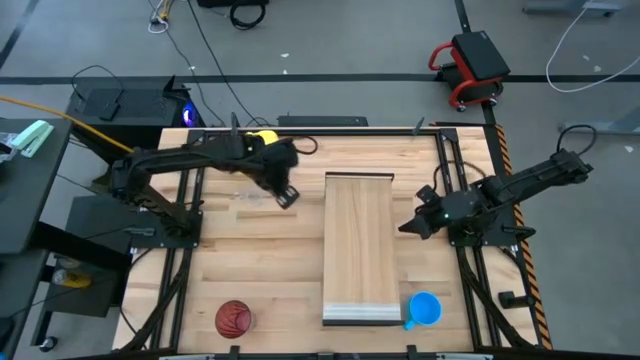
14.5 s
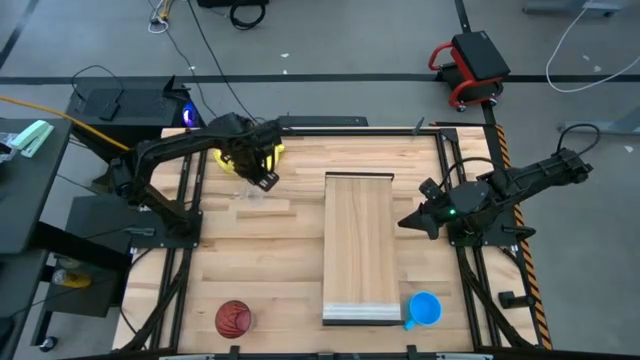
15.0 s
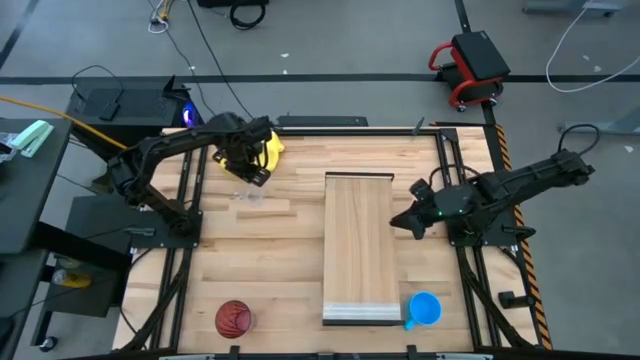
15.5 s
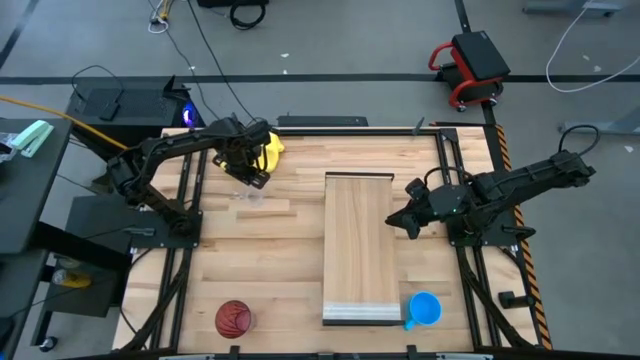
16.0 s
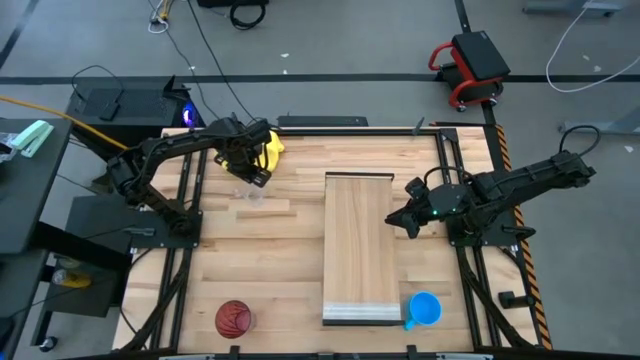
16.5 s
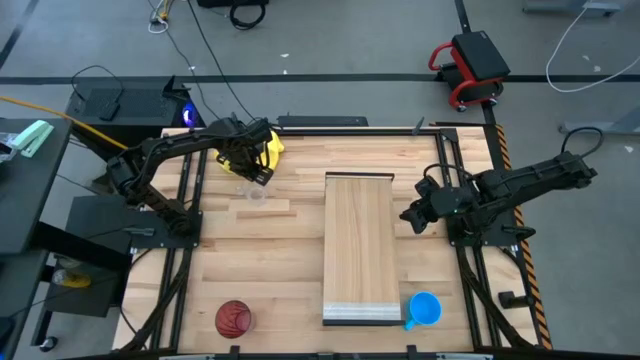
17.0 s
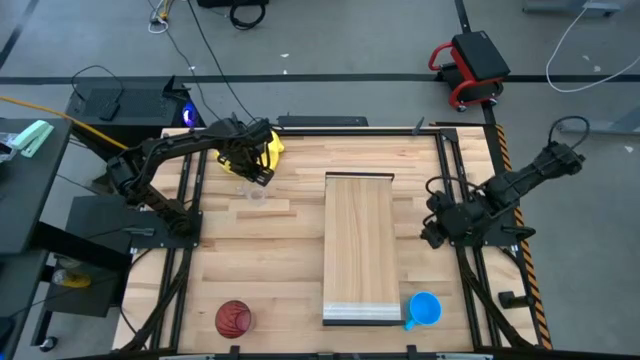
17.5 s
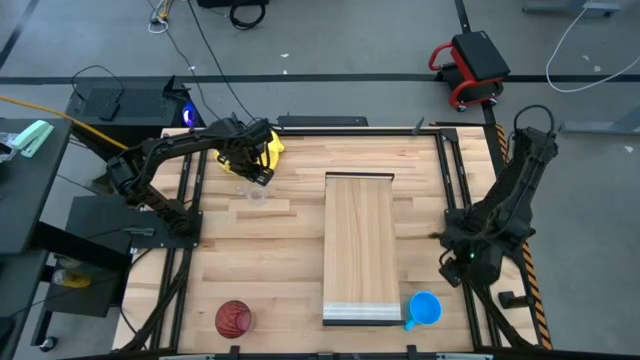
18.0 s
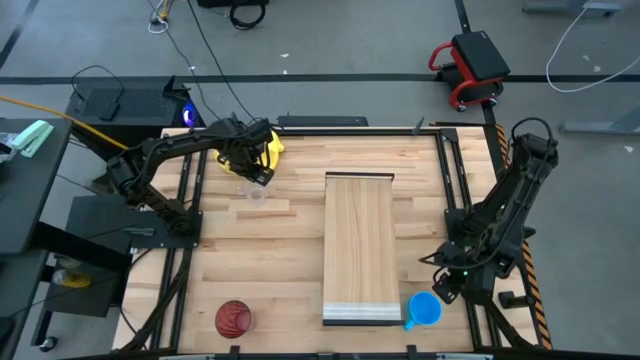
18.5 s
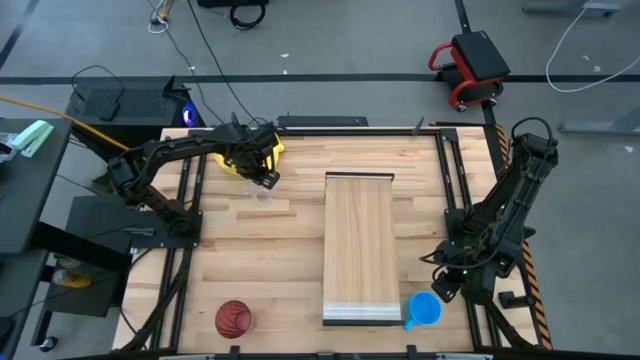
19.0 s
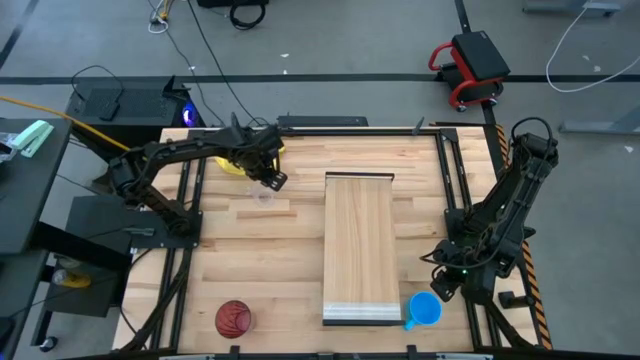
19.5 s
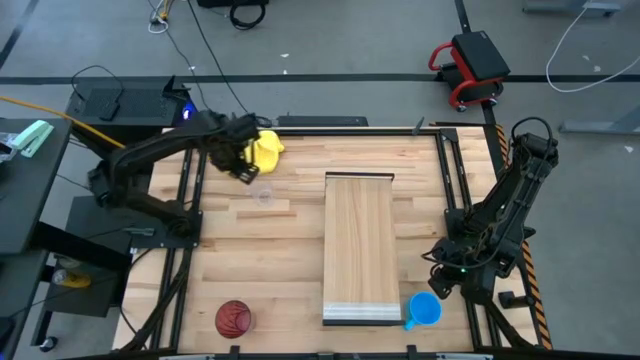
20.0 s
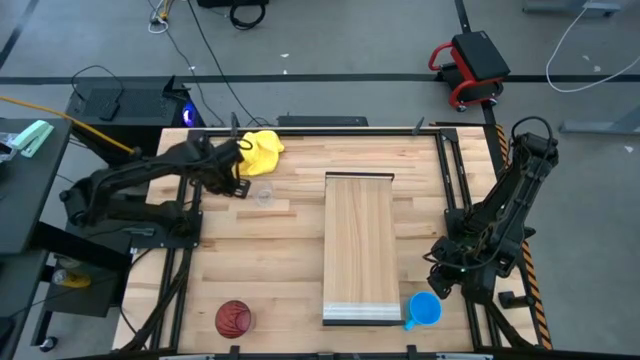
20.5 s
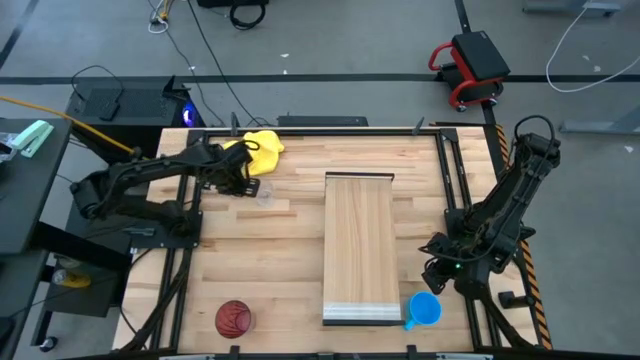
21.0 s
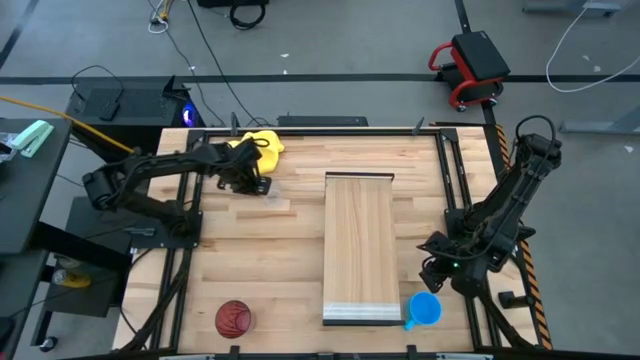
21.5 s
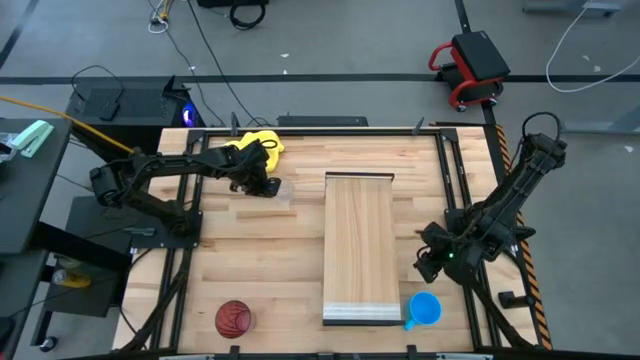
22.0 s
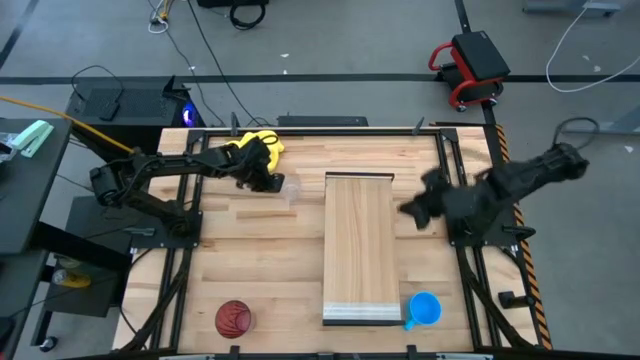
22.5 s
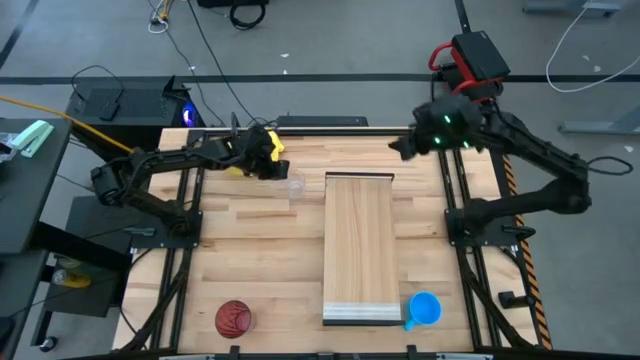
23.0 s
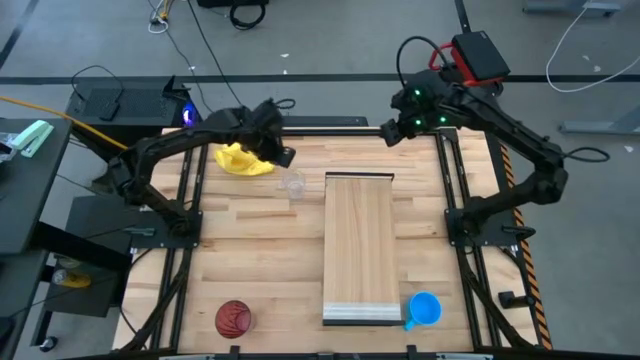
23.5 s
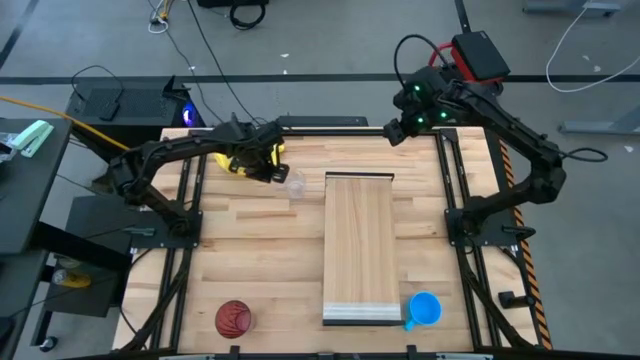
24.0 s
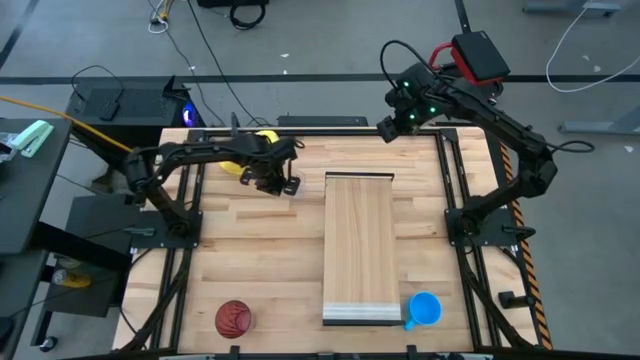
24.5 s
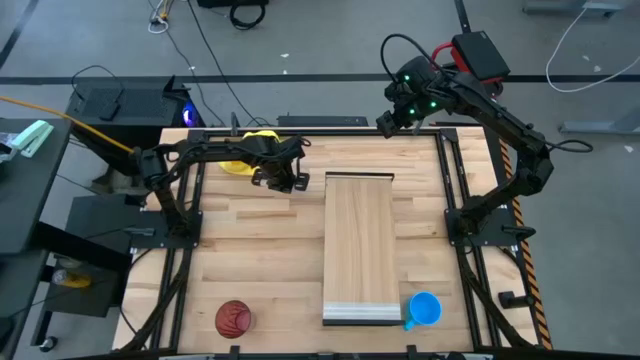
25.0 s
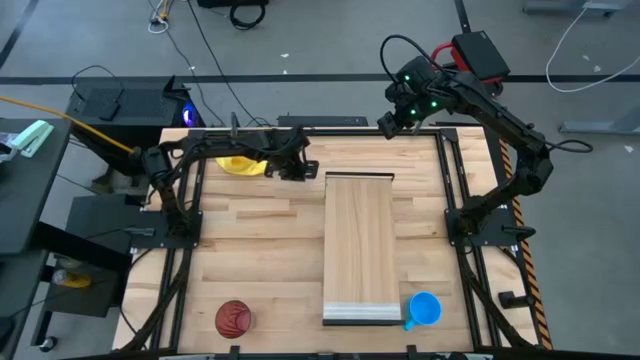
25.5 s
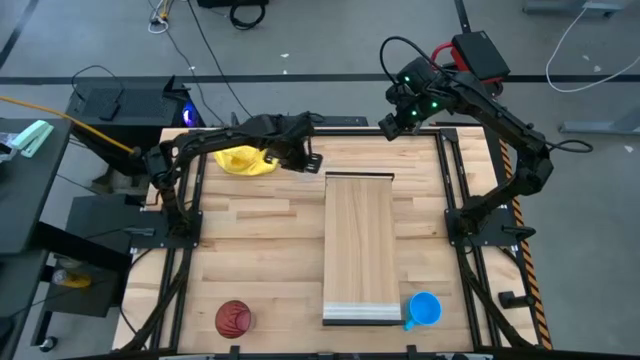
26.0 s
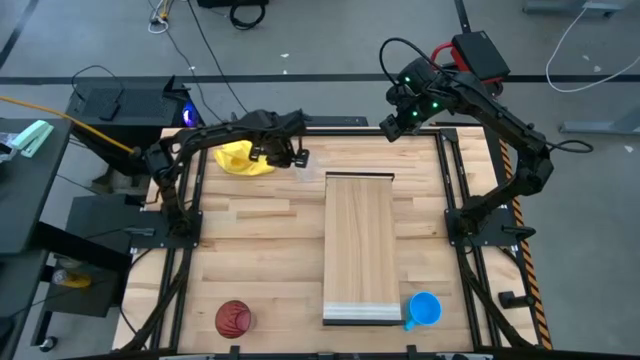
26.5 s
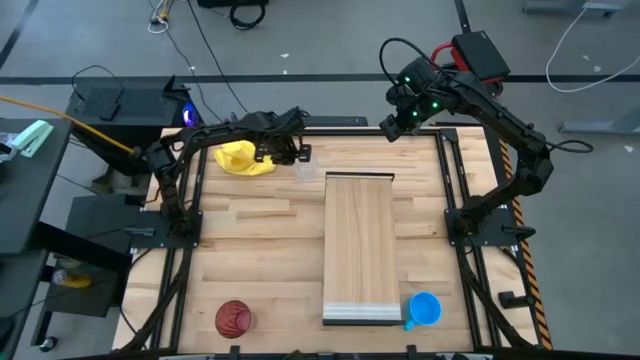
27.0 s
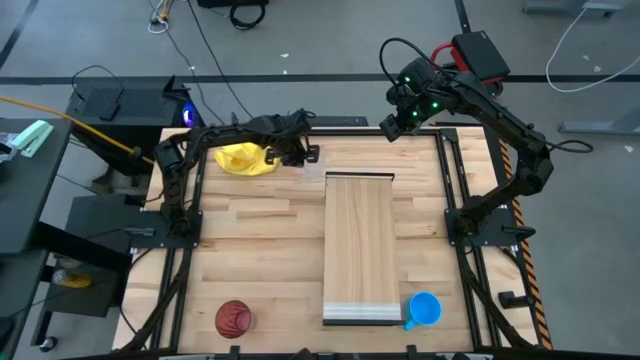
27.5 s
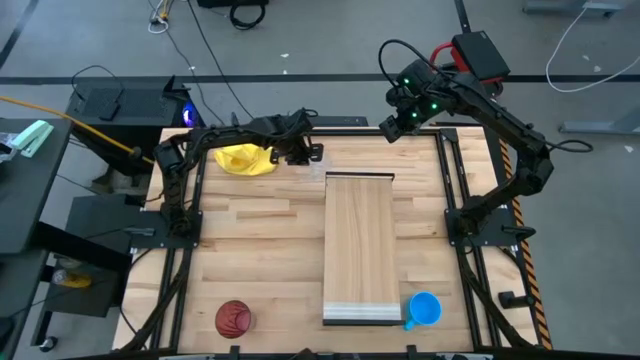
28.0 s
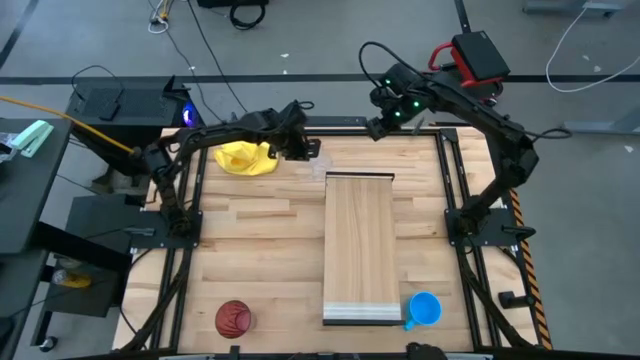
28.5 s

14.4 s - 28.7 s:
Task: Stack small to large cups/mugs on shelf
Put the transparent mug on the shelf

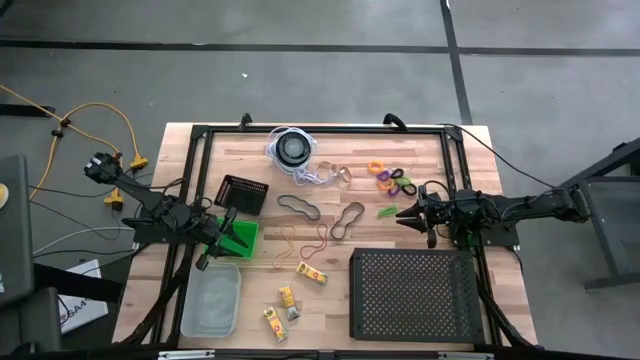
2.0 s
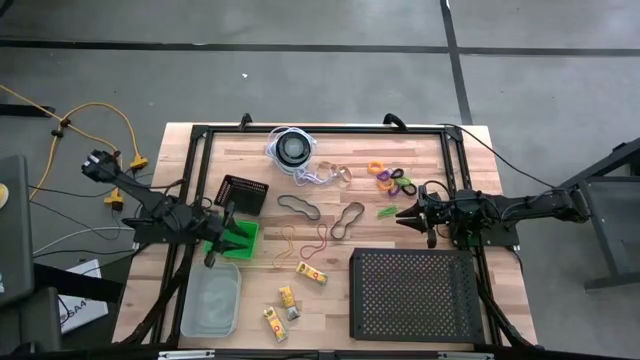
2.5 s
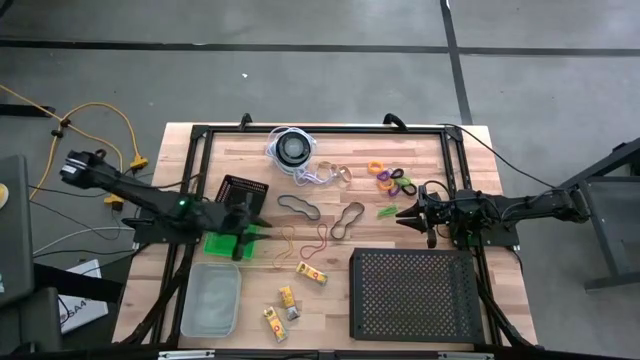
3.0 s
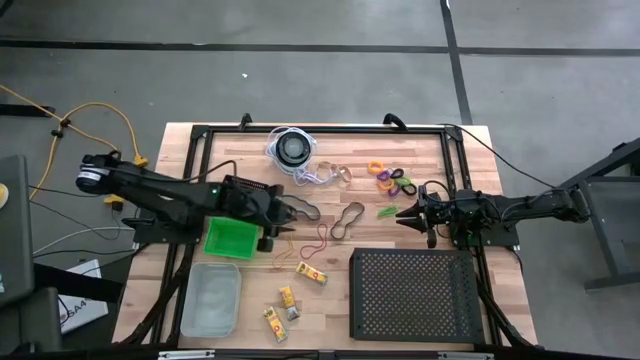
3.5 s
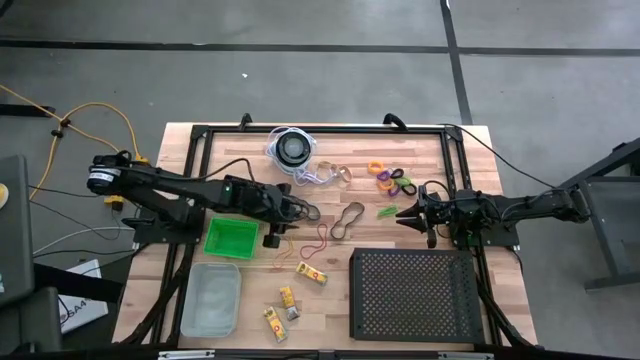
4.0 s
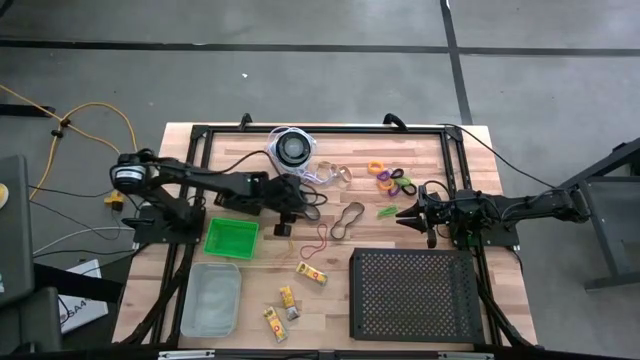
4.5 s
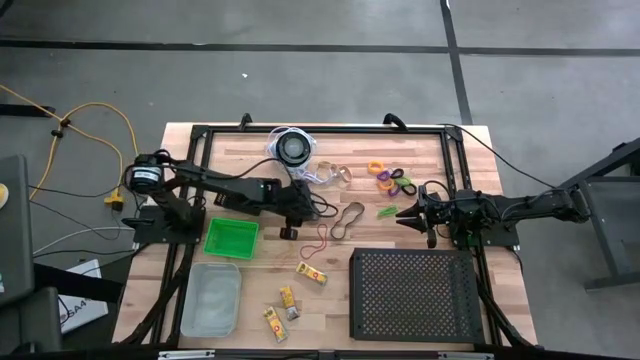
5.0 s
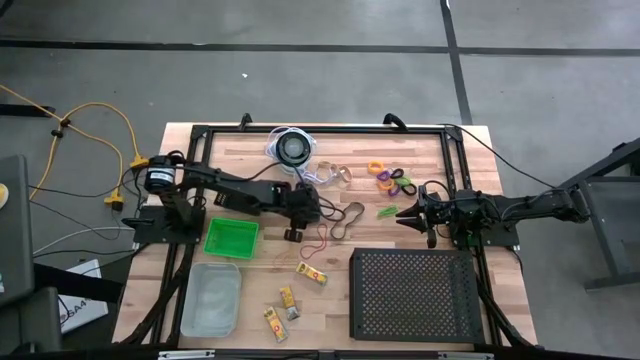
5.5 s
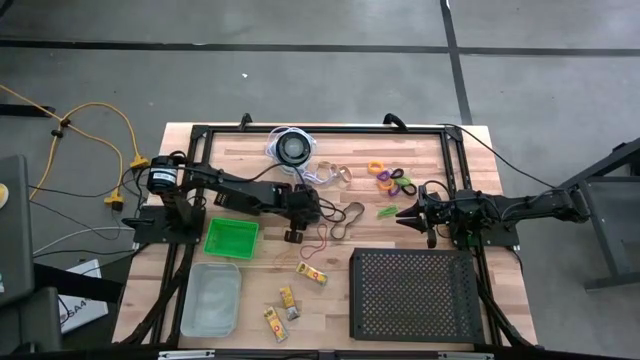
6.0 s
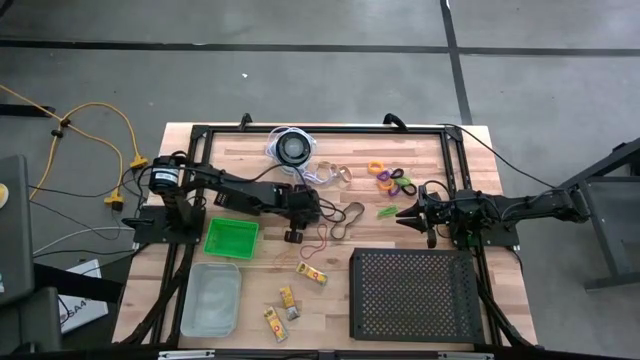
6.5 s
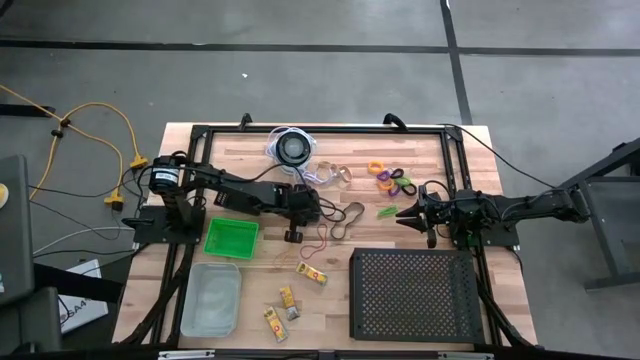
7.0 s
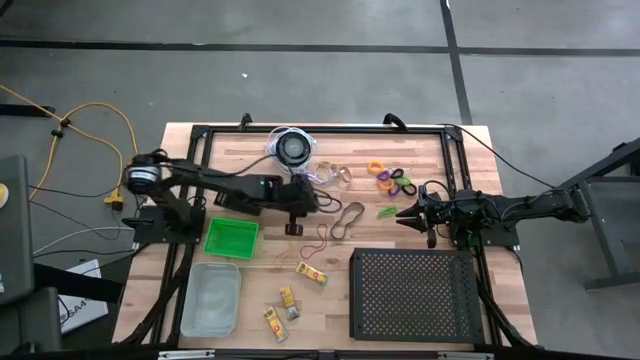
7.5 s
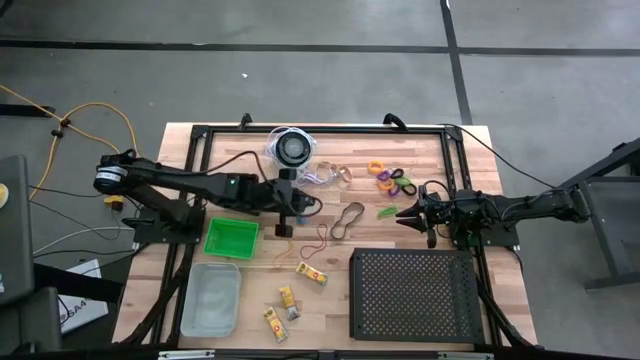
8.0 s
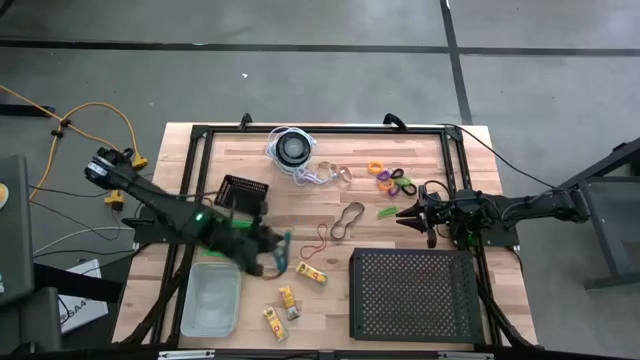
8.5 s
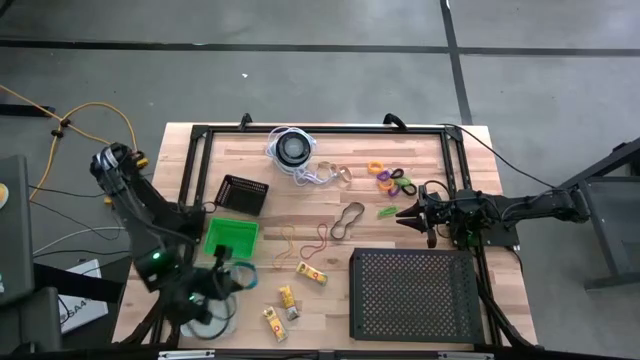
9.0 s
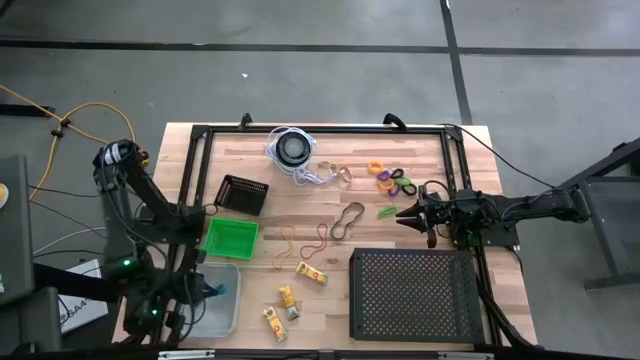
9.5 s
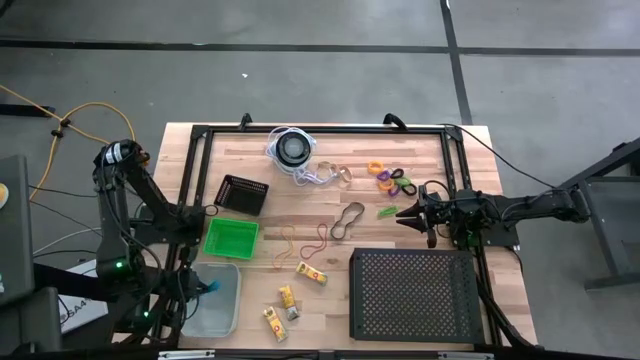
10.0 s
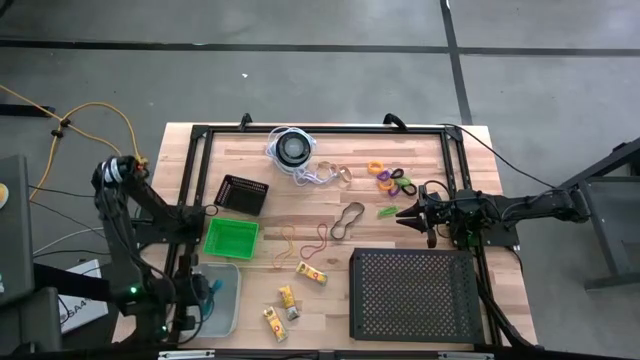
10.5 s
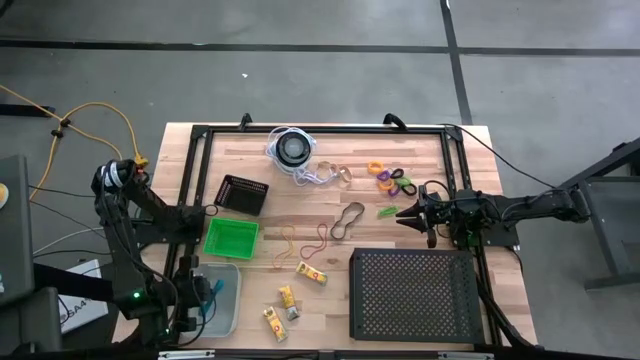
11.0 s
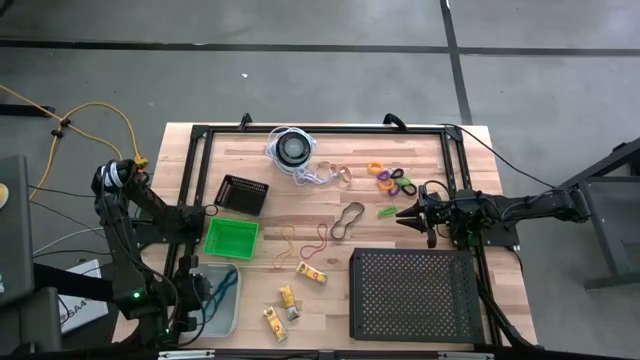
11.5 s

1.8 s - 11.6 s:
Task: Pick & Place Office Desk Supplies
Put the blue rubber band into the gray bin
